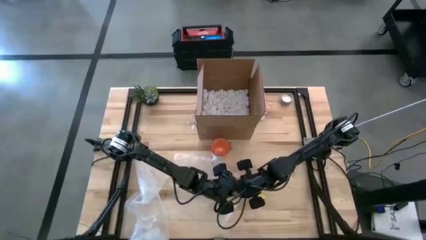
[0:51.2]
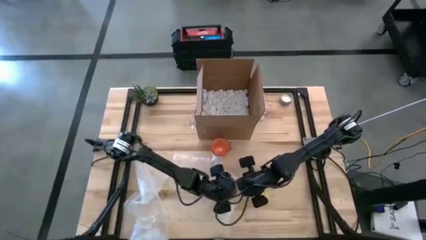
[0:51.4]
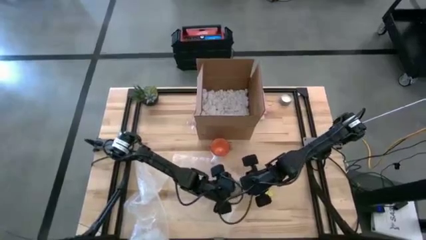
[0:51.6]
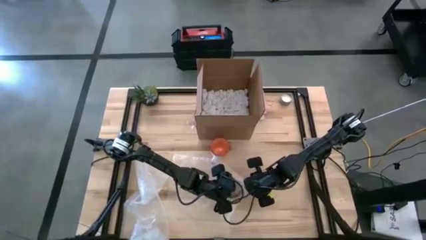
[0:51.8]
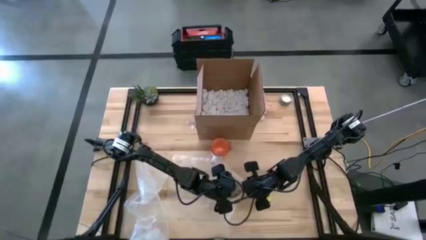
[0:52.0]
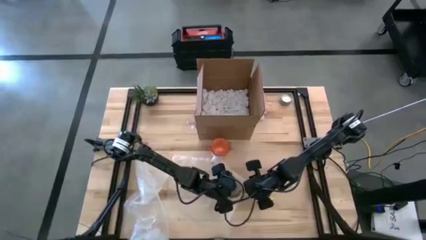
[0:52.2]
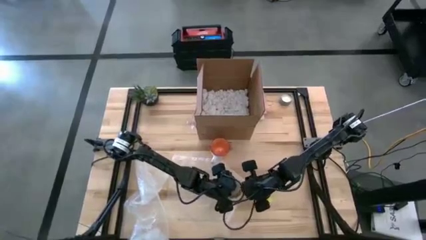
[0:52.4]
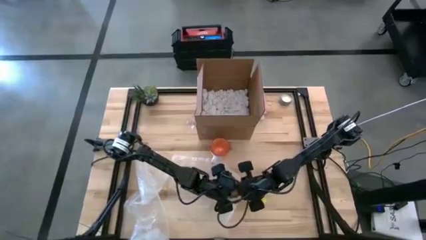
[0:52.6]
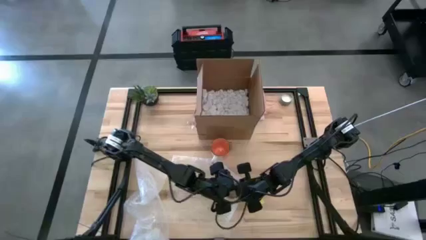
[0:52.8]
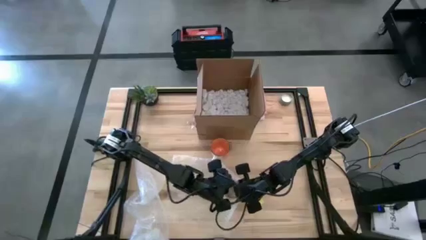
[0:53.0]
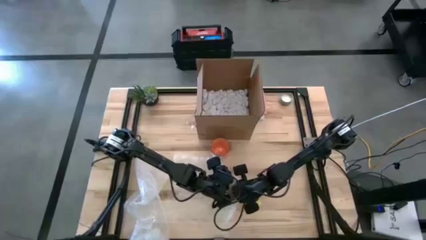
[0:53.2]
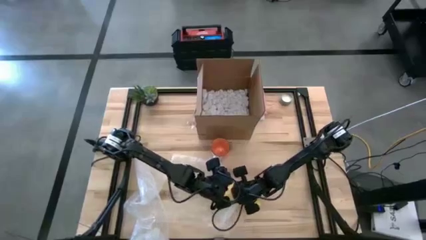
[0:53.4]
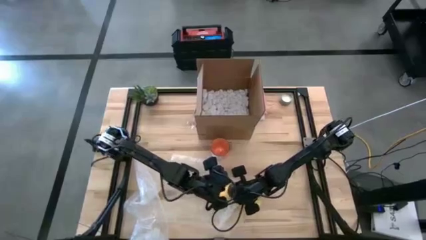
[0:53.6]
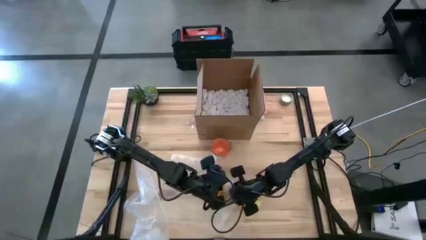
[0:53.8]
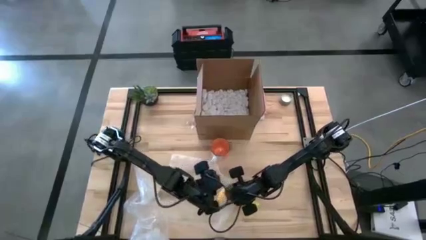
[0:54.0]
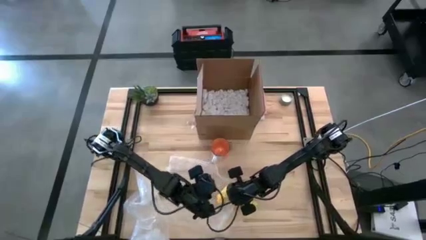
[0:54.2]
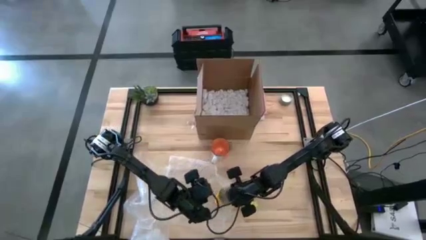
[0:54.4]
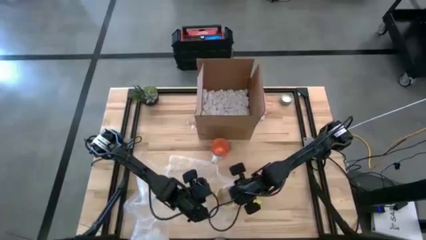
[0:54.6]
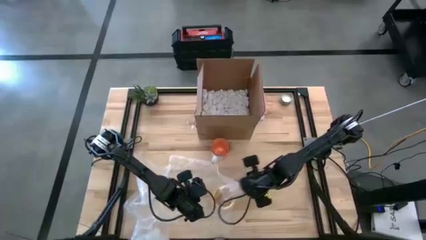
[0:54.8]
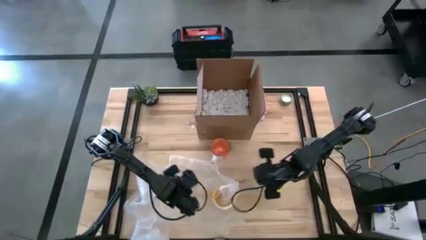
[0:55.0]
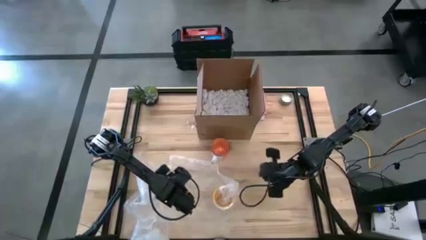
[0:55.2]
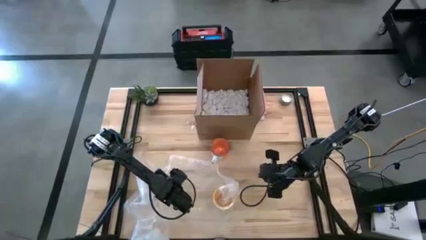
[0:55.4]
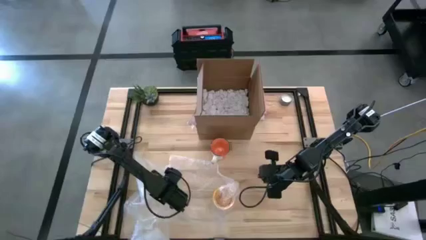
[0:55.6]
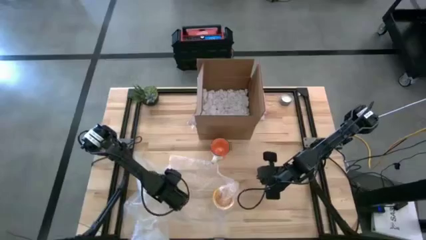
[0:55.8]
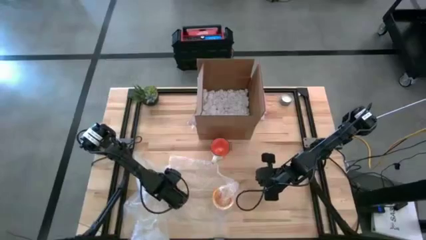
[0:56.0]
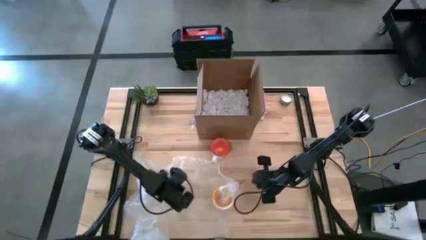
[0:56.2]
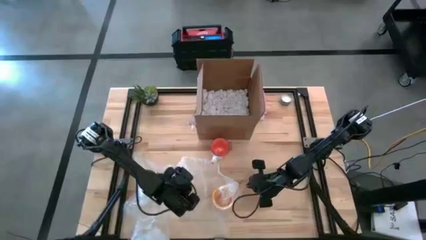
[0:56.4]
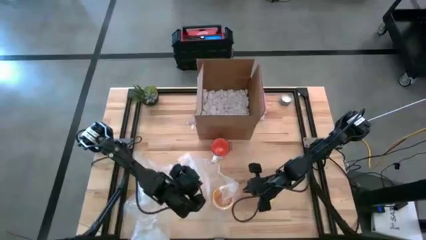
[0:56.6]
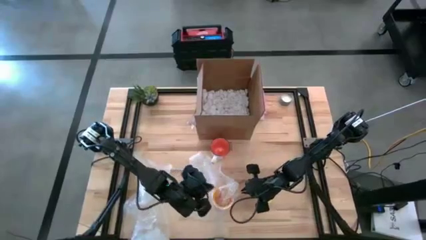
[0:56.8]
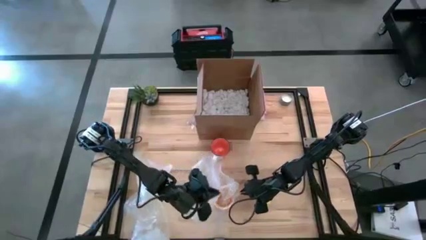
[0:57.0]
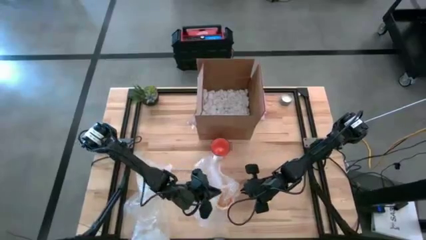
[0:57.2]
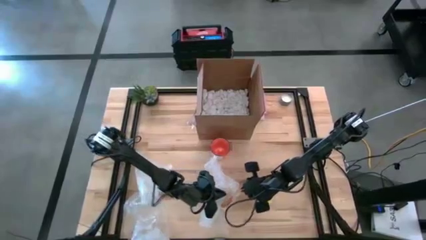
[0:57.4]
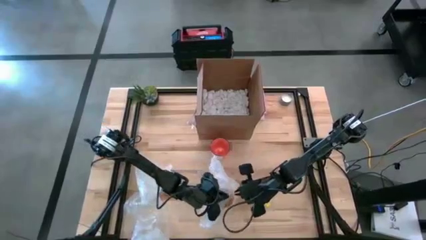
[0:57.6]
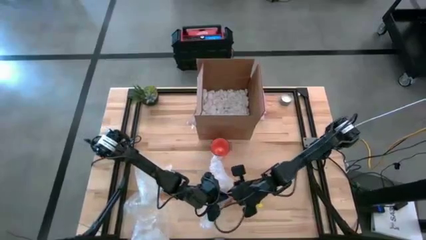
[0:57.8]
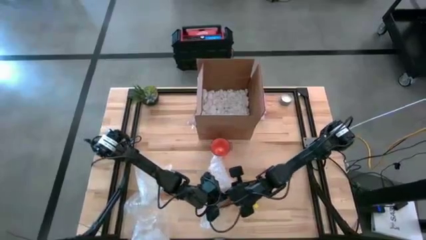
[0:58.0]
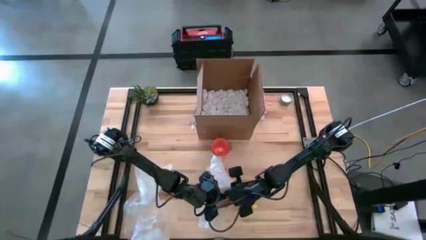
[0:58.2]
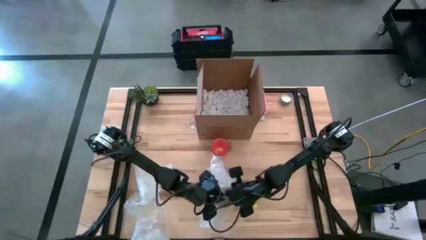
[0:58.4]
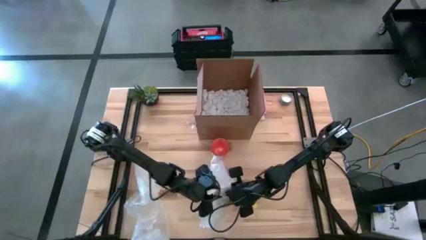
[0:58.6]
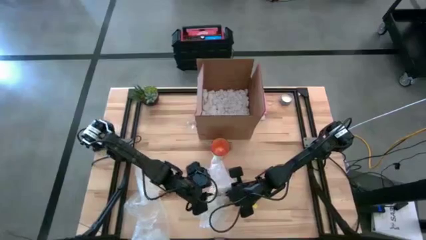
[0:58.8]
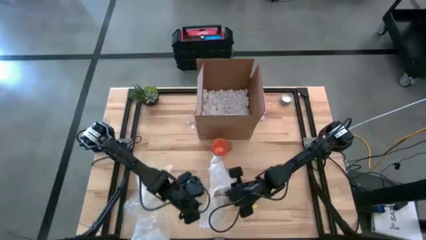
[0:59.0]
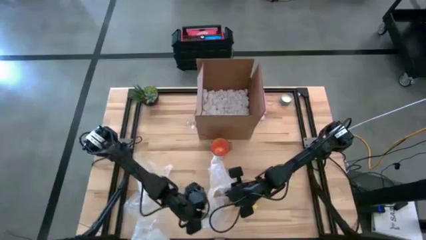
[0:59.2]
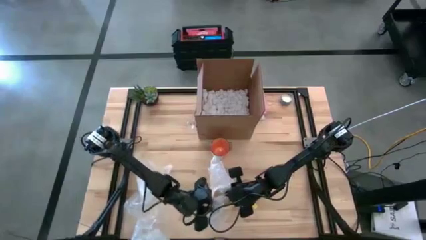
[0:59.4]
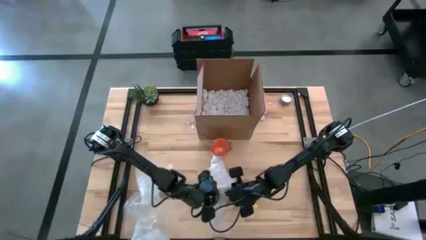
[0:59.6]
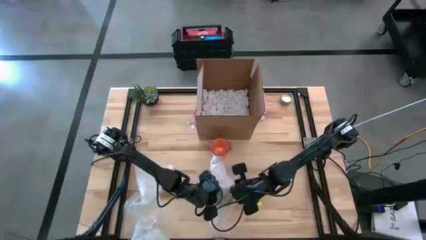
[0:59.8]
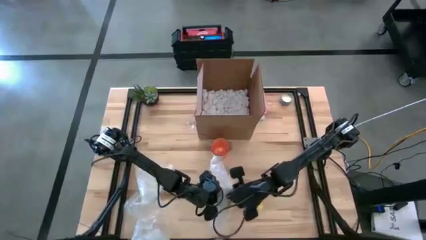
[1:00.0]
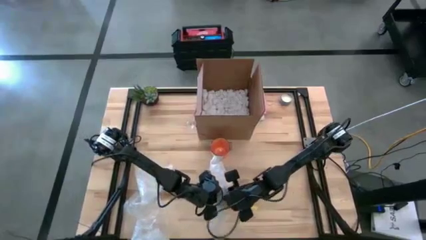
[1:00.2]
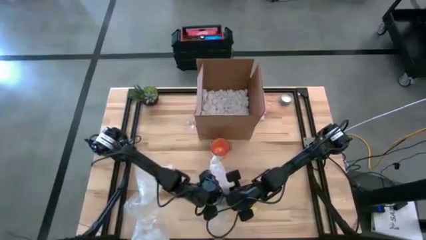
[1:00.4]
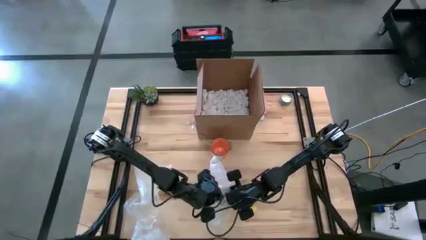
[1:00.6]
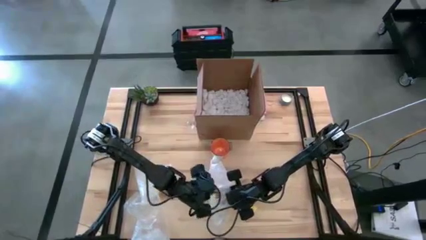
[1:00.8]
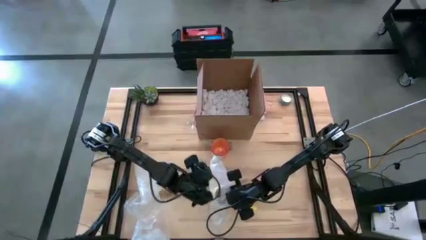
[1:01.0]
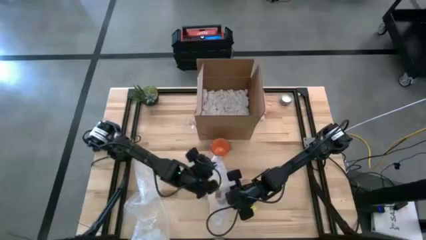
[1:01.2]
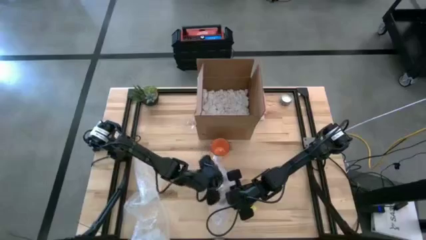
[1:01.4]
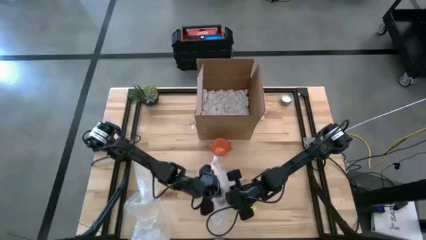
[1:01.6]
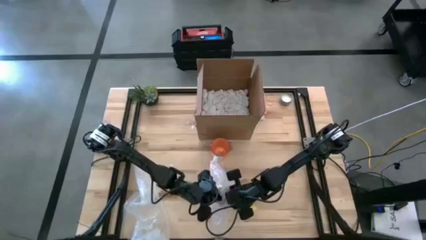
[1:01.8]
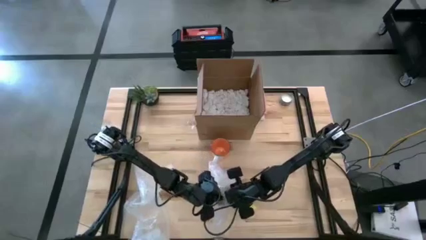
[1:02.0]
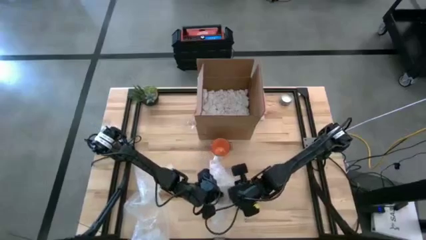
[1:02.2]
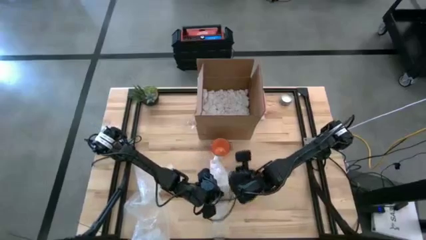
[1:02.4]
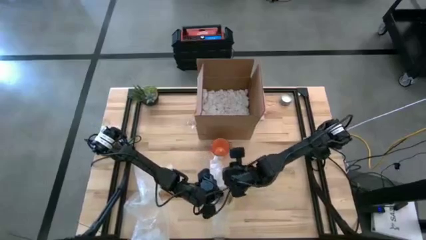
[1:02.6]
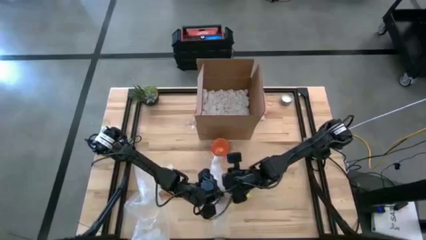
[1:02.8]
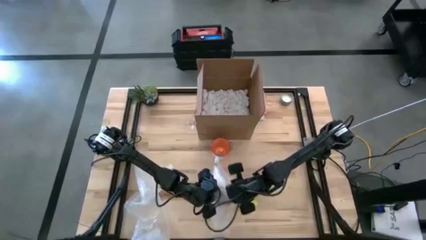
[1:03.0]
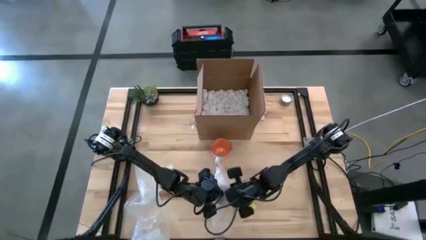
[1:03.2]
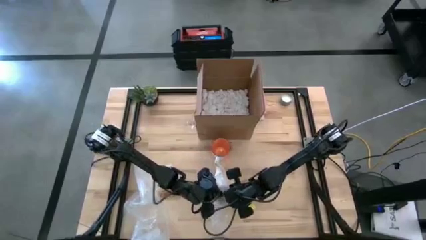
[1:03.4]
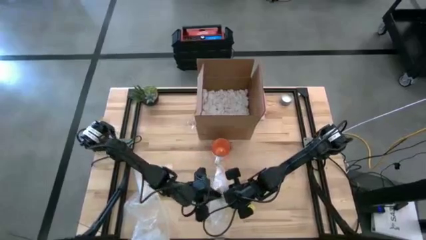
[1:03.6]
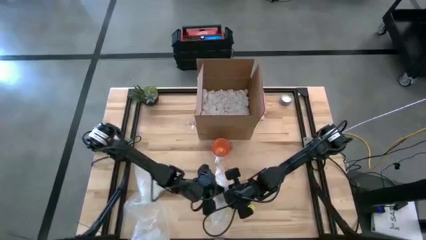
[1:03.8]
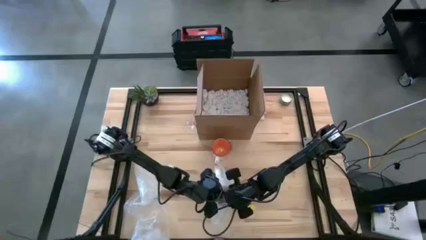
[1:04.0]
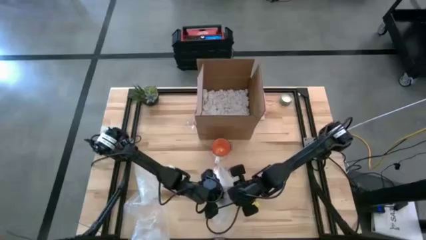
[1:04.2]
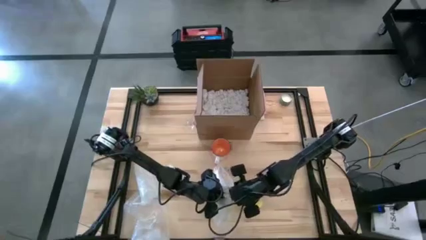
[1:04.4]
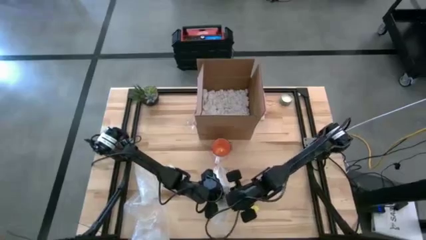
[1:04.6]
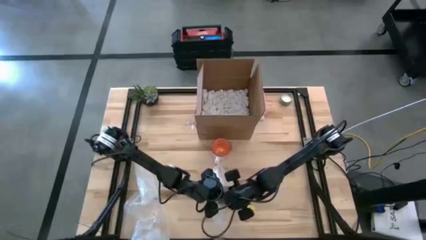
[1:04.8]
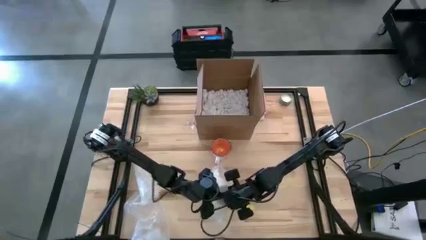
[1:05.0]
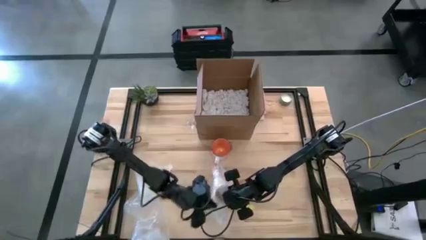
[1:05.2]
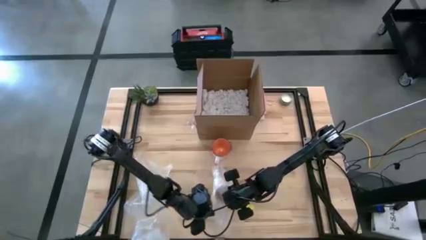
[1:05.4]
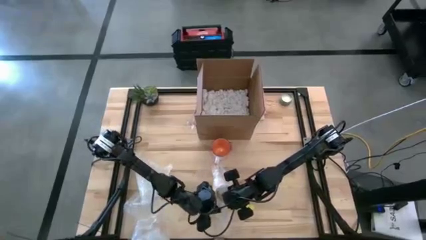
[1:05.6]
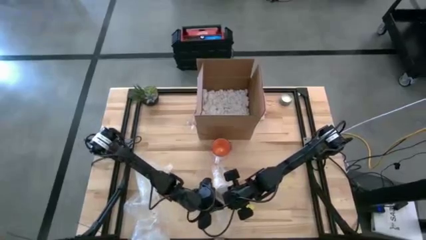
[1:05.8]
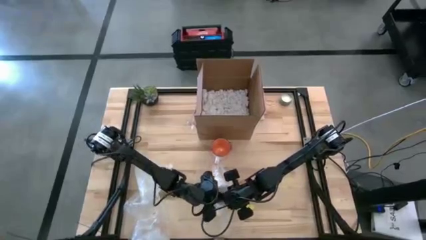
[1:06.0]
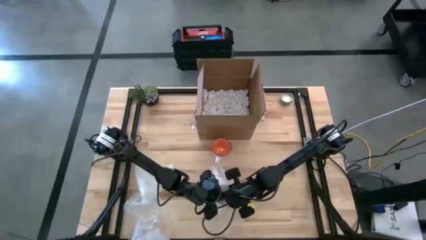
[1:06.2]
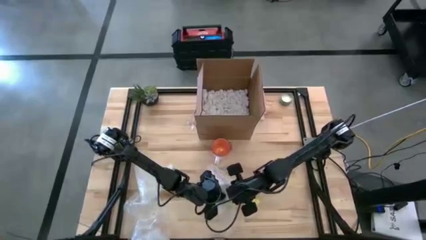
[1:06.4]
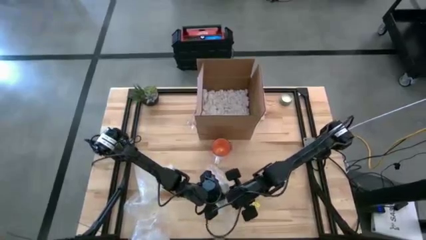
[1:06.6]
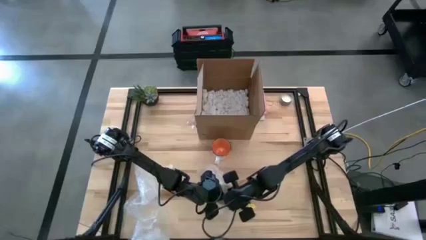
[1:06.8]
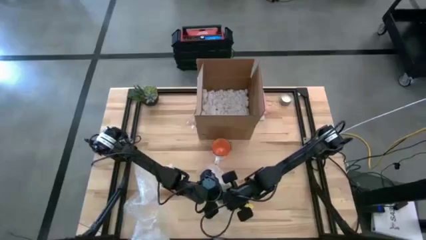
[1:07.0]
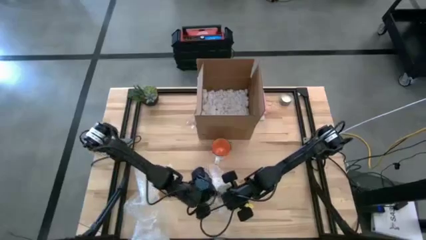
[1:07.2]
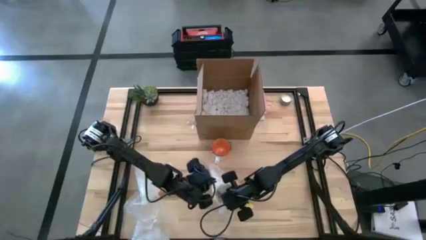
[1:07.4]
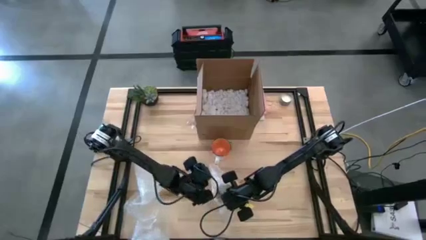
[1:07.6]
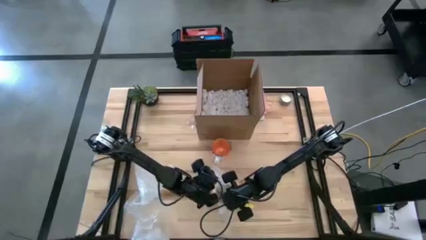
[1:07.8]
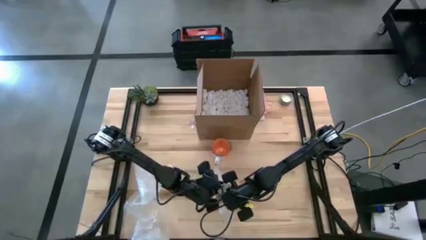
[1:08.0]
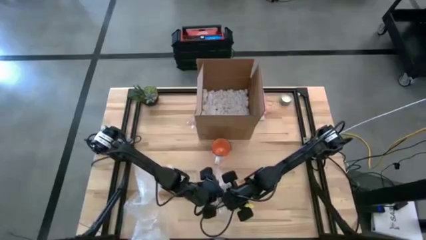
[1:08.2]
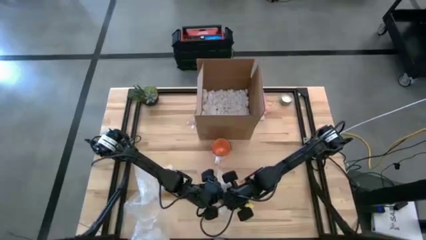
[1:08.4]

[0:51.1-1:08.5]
Task: wrap mug
Wrap the yellow mug with the transparent bubble wrap
